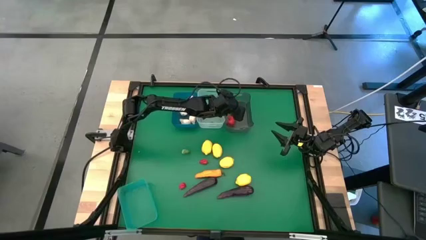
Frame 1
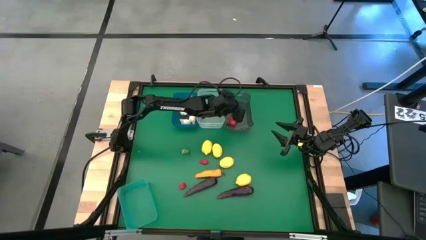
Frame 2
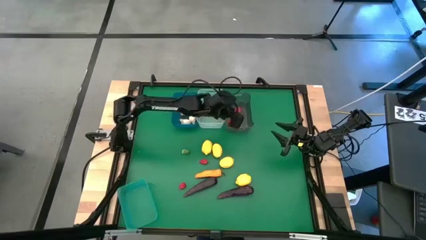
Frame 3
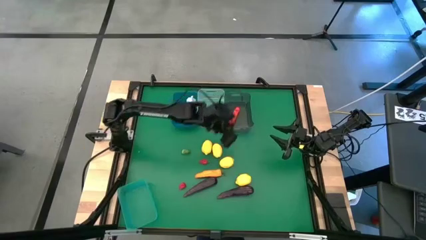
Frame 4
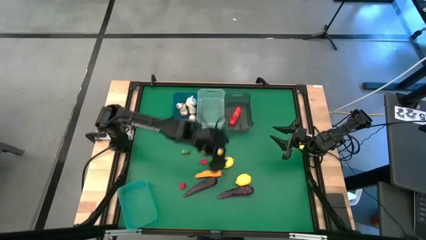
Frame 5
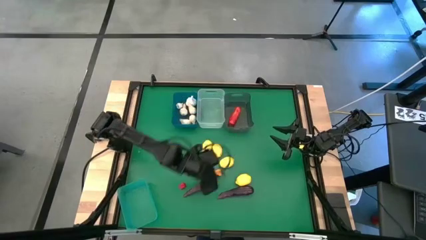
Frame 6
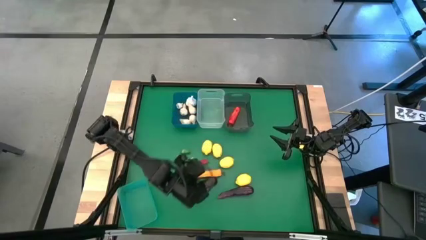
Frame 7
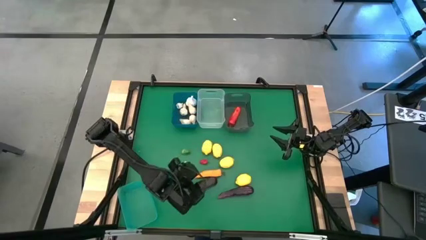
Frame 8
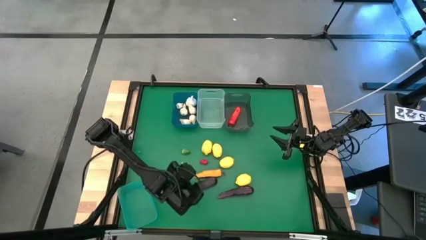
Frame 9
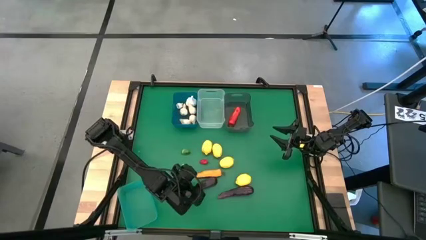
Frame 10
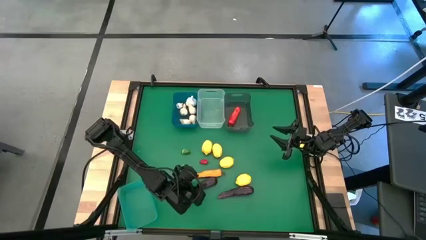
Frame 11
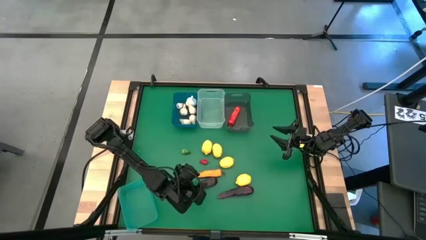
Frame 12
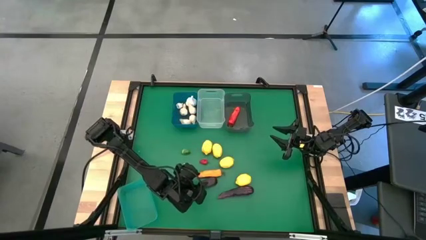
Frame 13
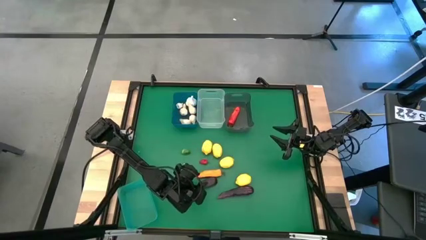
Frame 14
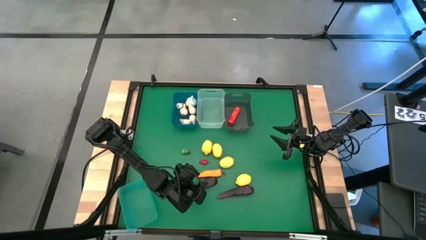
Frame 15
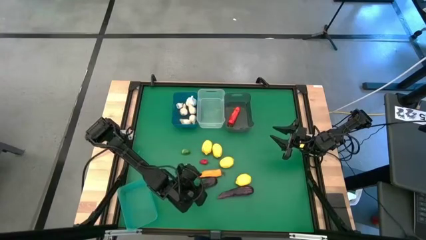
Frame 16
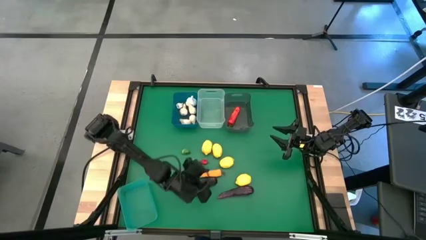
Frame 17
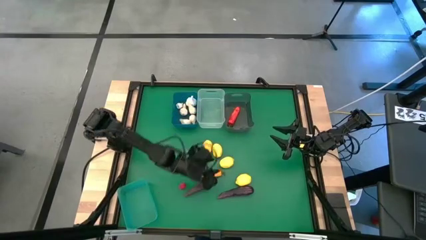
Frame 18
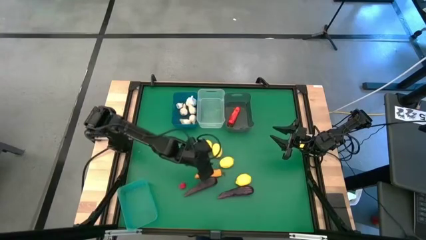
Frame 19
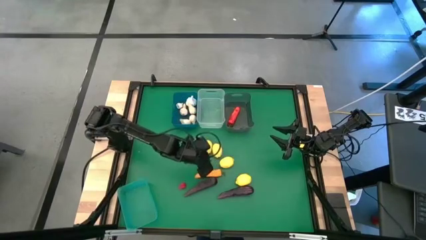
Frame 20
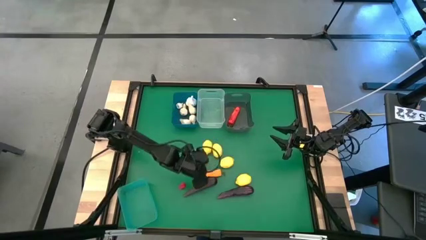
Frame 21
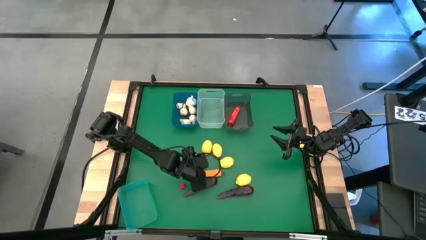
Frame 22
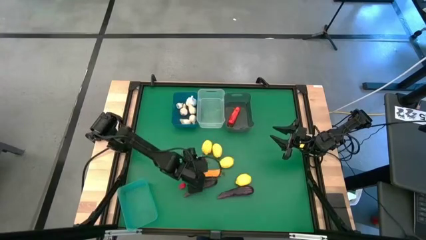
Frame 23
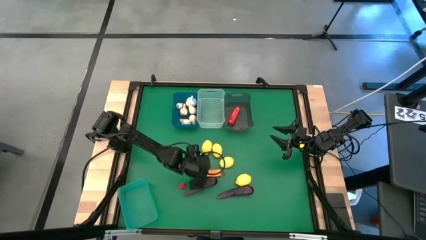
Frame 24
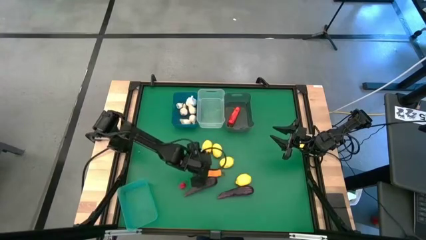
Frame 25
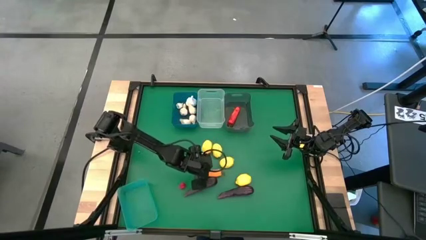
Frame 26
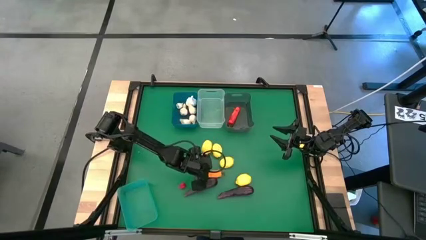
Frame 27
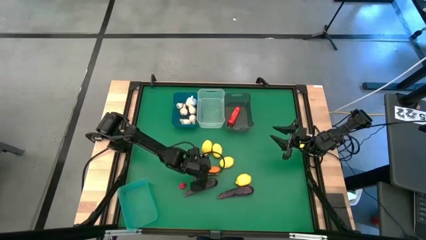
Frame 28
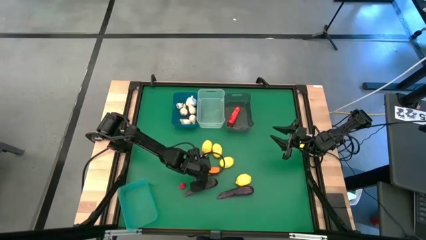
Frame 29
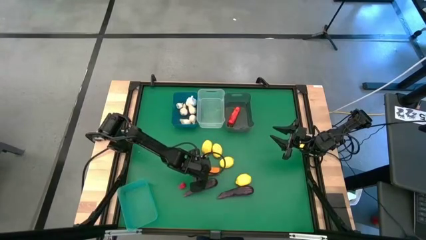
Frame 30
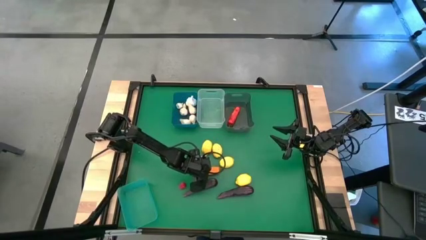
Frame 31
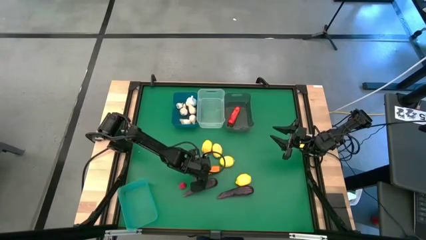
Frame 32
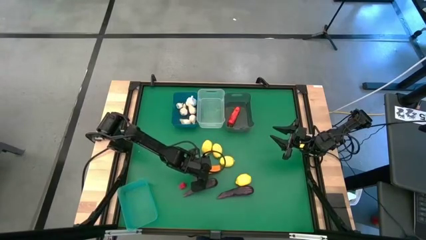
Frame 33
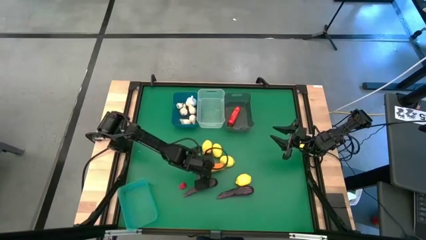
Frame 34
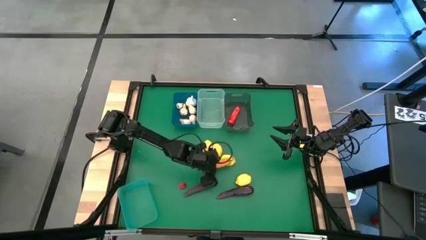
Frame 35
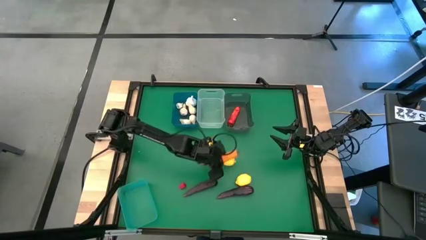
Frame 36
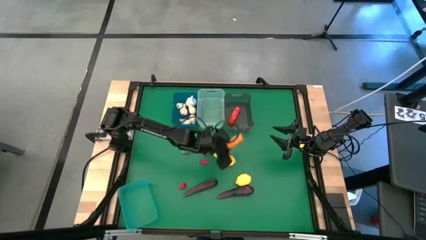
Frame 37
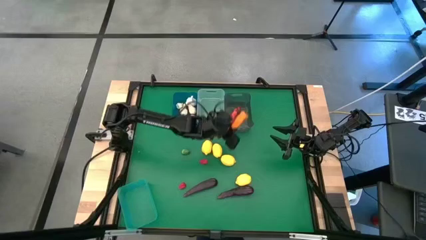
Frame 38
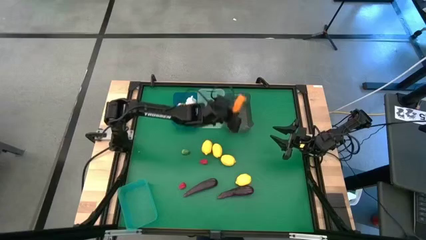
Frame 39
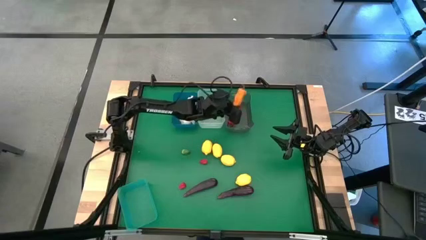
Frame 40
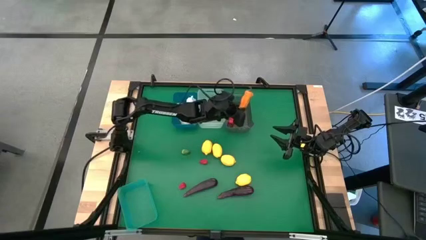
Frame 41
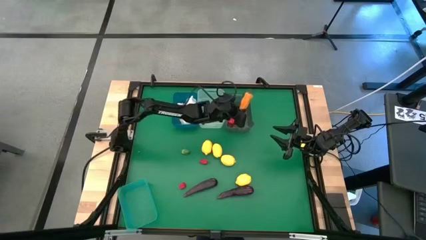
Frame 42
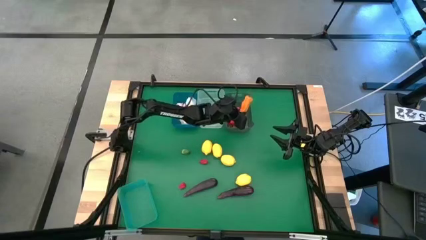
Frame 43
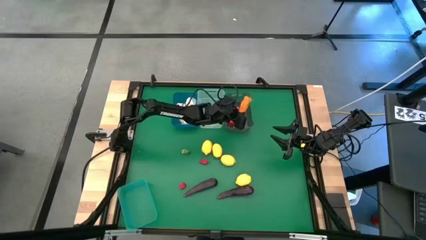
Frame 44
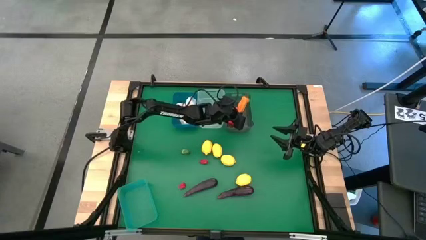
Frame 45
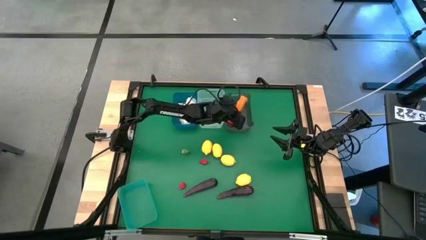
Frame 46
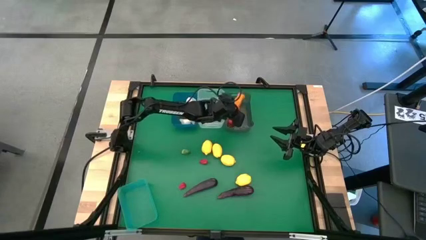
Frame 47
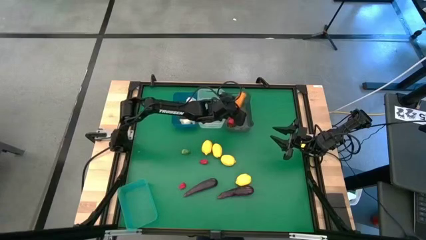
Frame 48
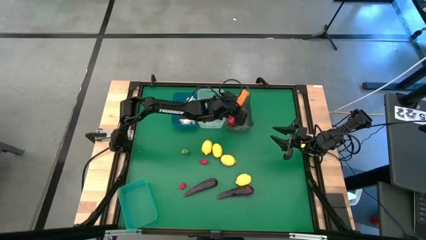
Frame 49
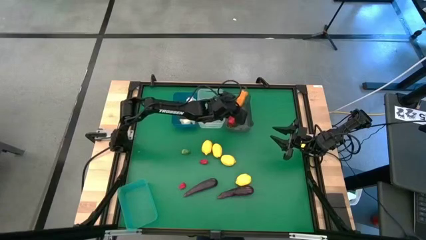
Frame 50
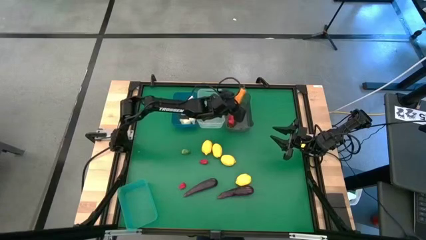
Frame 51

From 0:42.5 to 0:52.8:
Task: Sort produce into baskets
Put the orange chili pepper into the black bin

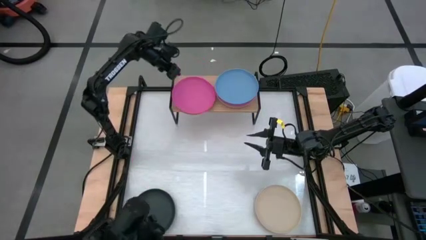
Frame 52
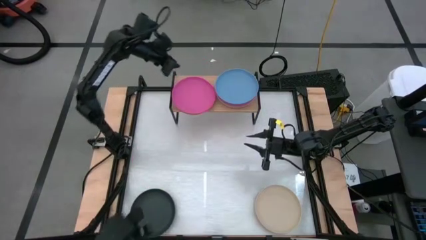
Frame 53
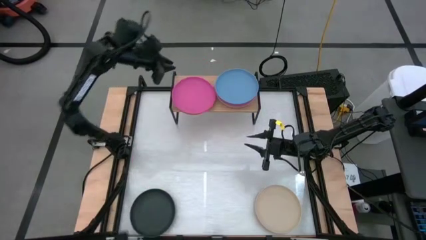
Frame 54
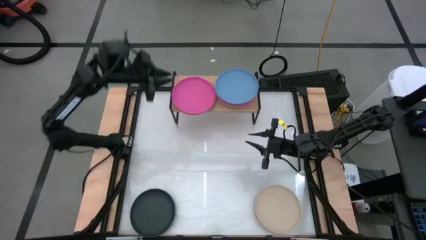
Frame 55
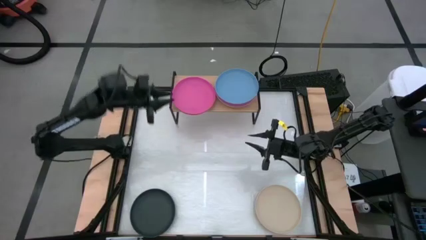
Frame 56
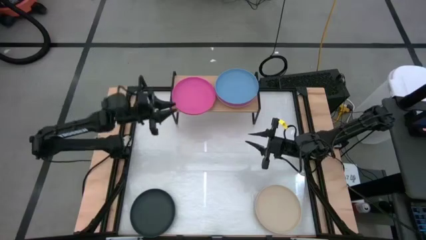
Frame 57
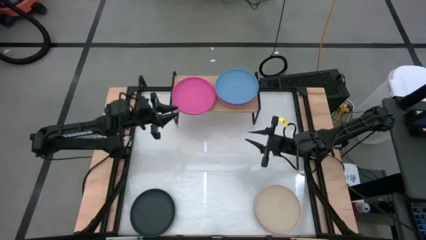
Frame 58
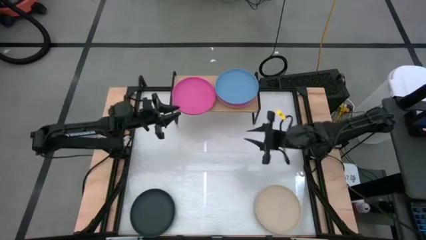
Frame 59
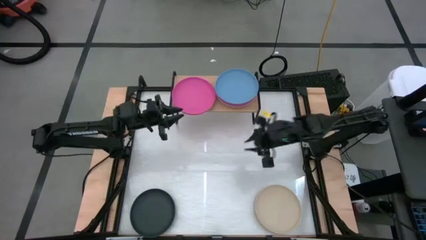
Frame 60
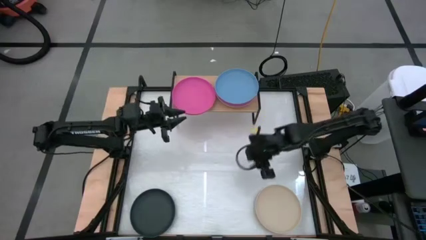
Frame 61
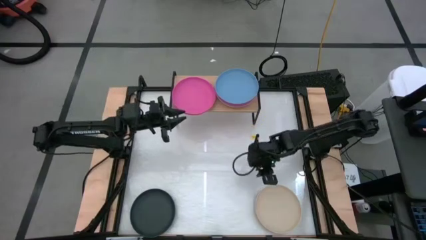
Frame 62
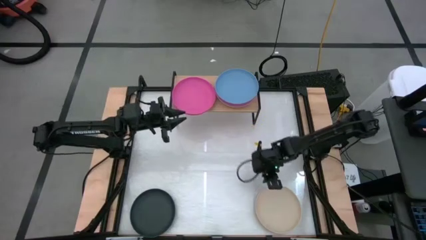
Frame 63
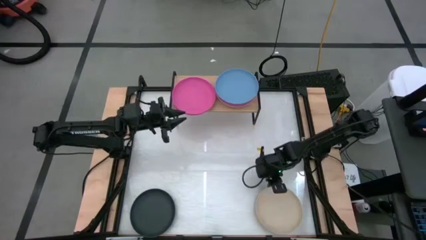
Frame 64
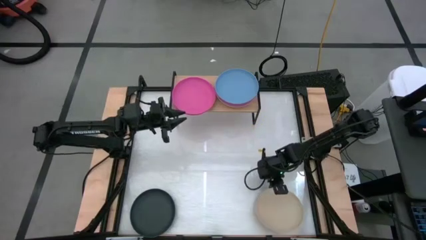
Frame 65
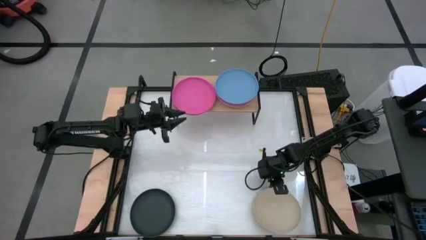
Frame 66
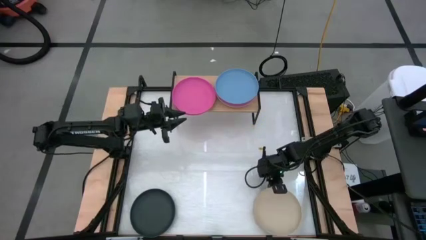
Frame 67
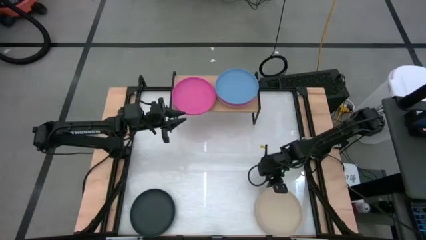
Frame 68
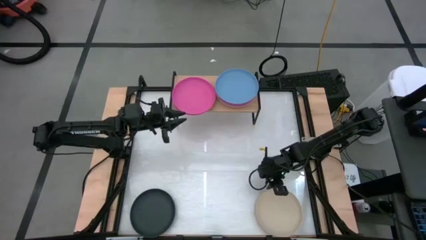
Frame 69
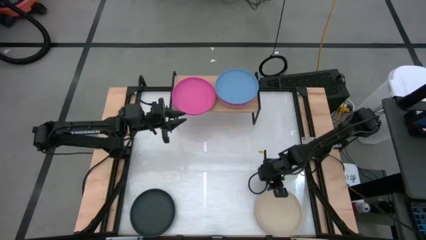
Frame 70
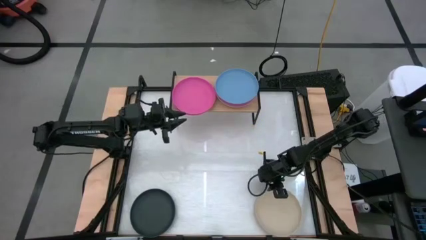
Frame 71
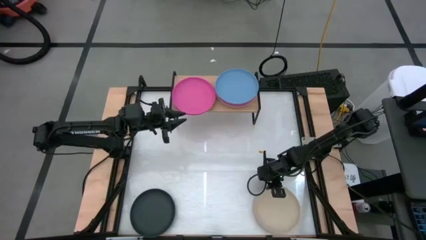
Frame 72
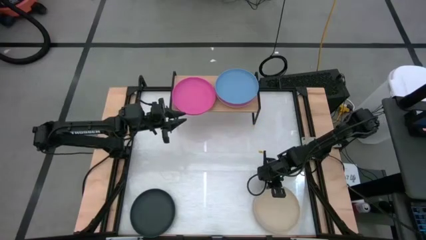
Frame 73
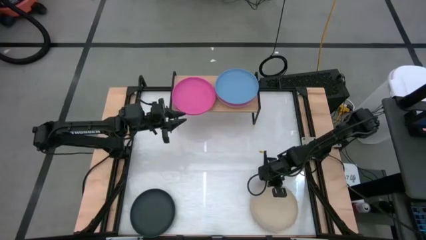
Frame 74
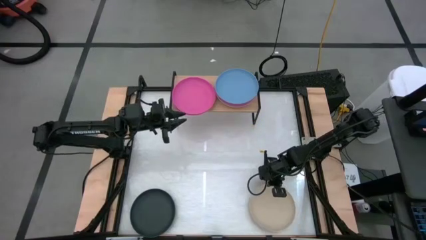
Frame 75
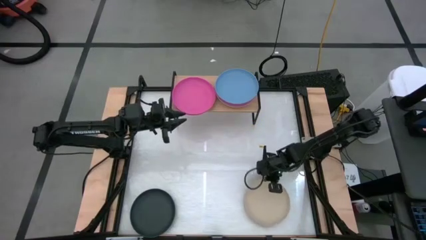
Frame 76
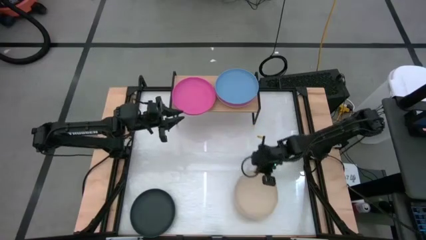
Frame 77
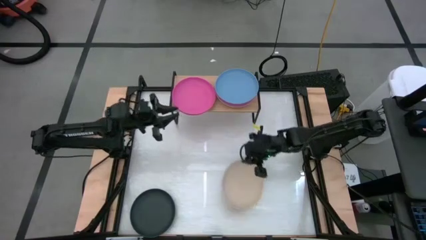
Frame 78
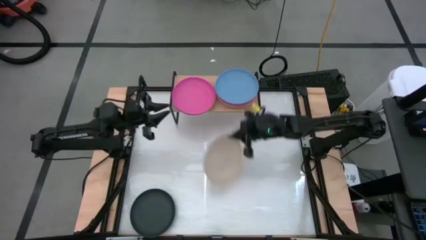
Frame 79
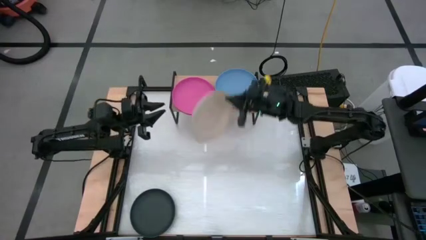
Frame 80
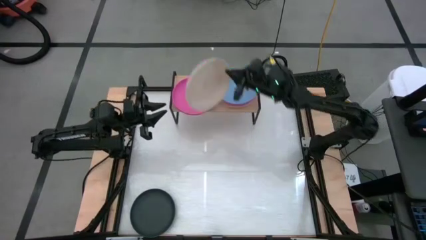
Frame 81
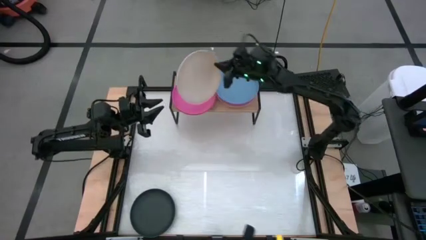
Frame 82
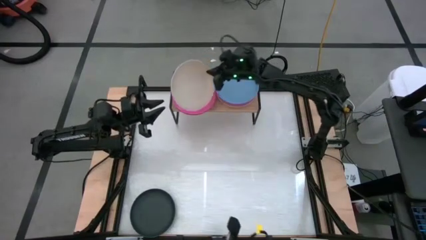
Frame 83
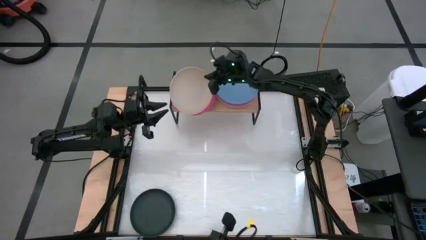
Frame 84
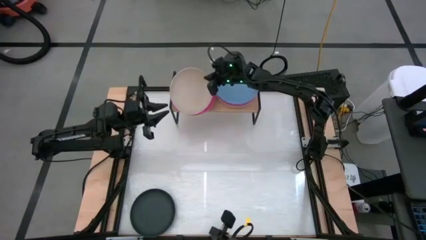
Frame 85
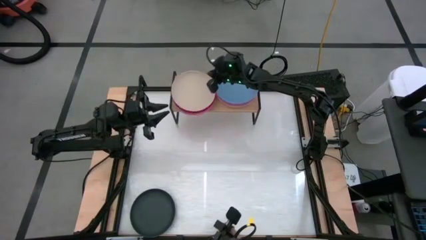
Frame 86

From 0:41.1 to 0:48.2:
Task: Place and stack plates onto a shelf
Stack the gray plate on top of the pink plate
